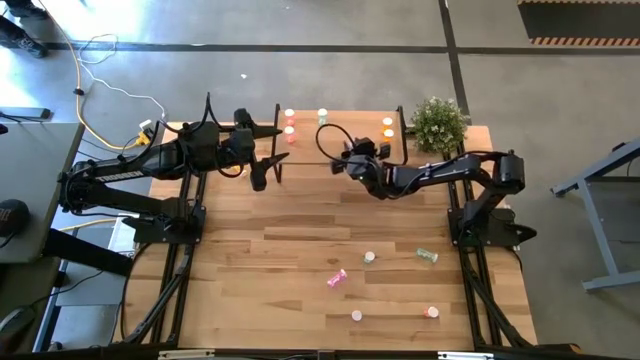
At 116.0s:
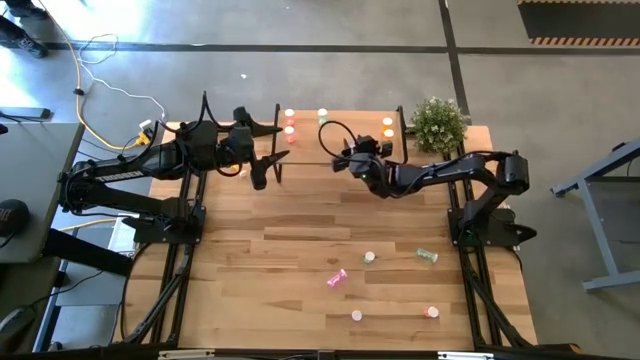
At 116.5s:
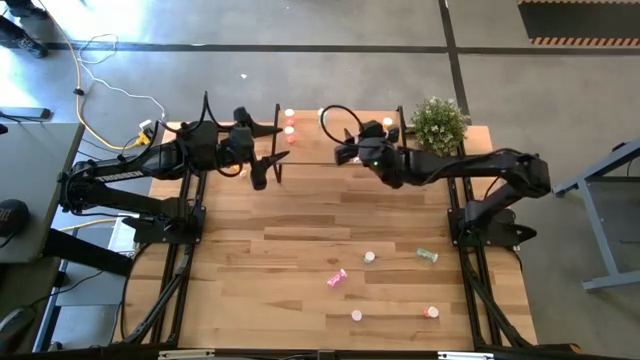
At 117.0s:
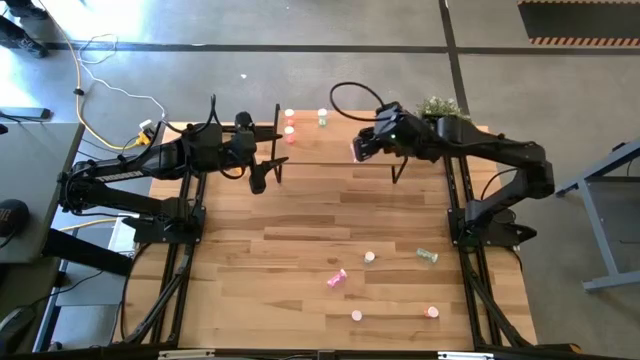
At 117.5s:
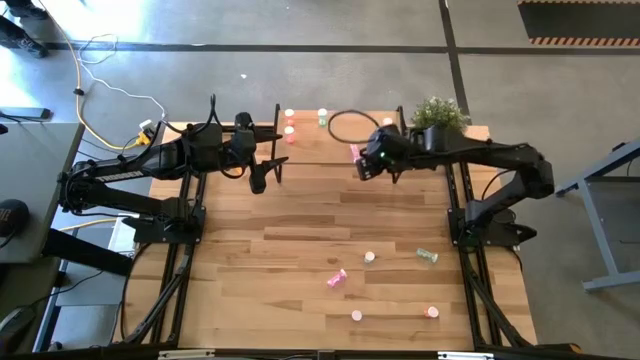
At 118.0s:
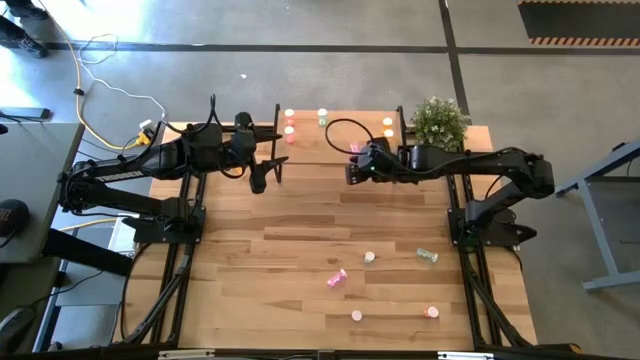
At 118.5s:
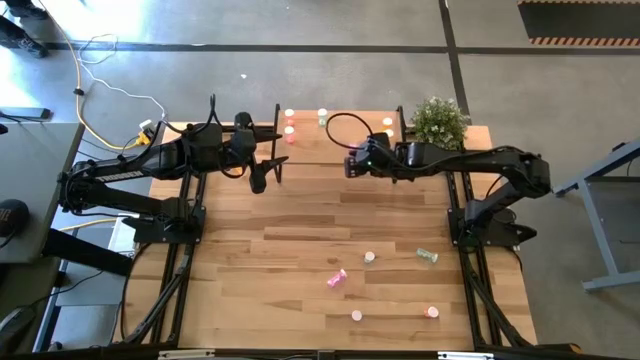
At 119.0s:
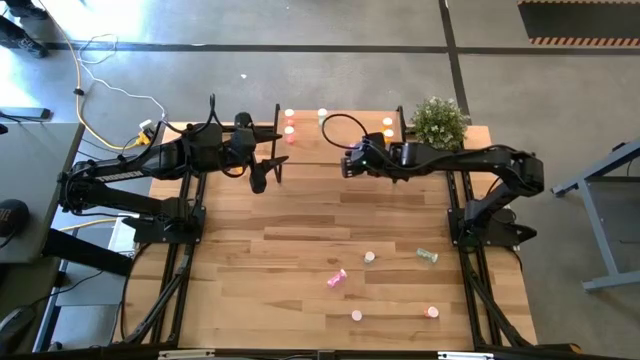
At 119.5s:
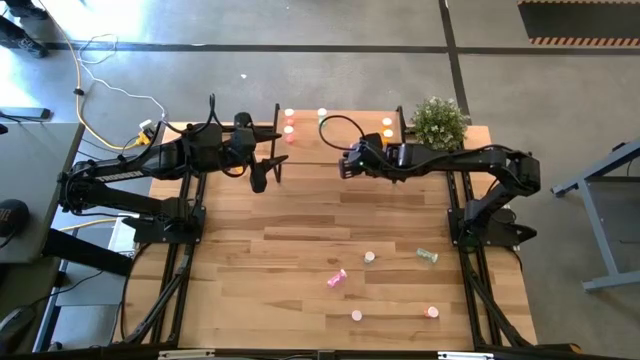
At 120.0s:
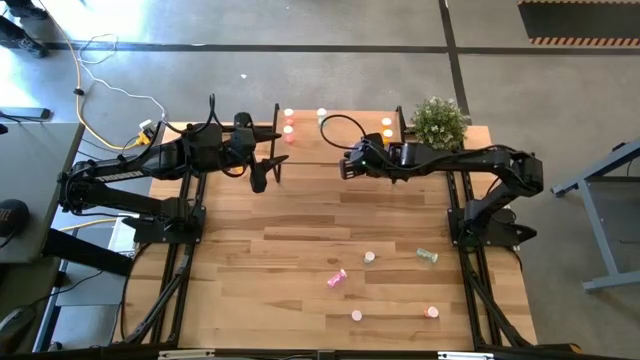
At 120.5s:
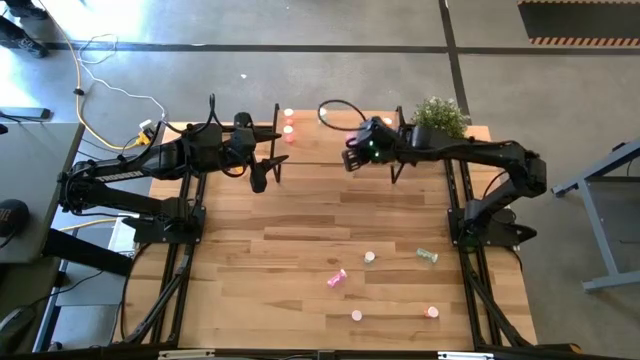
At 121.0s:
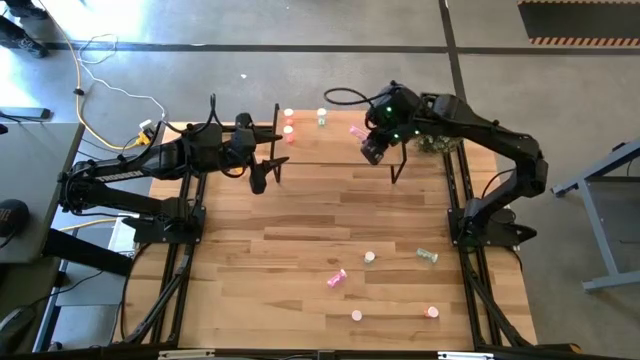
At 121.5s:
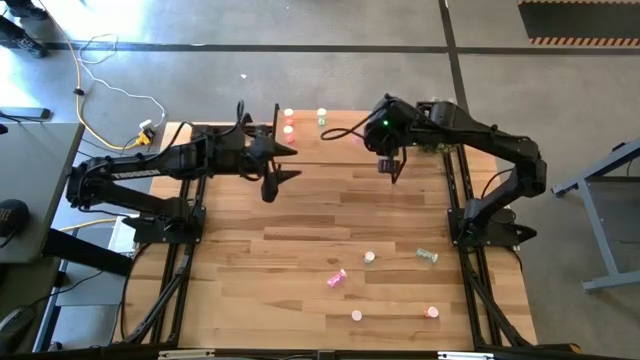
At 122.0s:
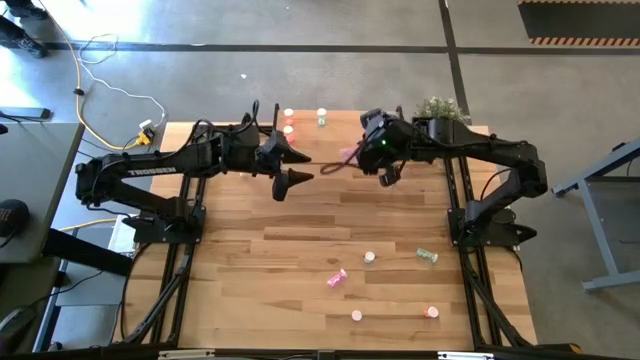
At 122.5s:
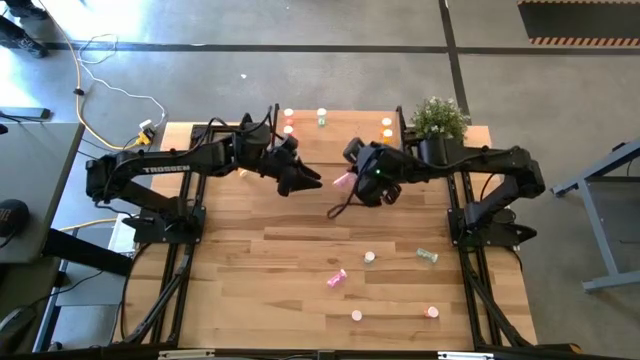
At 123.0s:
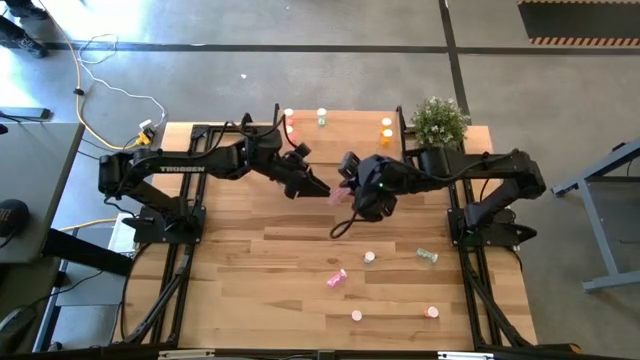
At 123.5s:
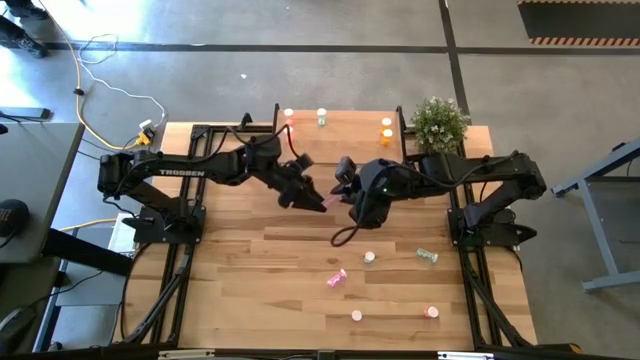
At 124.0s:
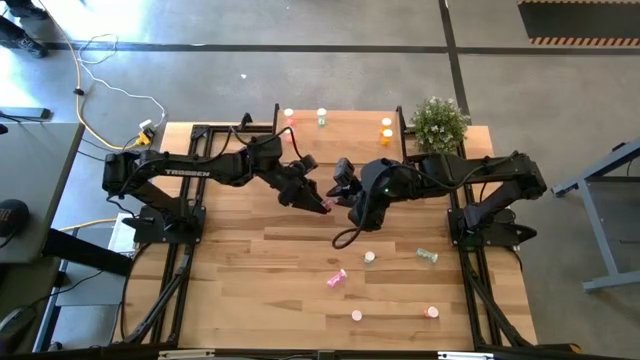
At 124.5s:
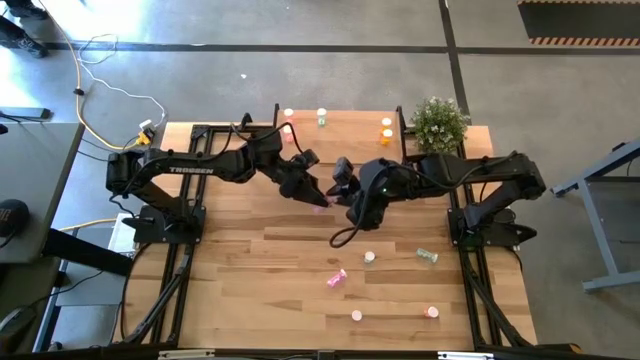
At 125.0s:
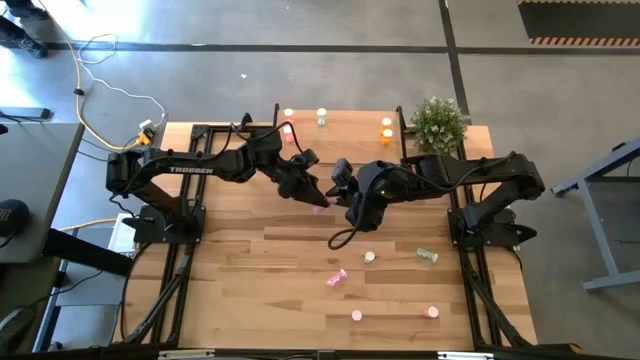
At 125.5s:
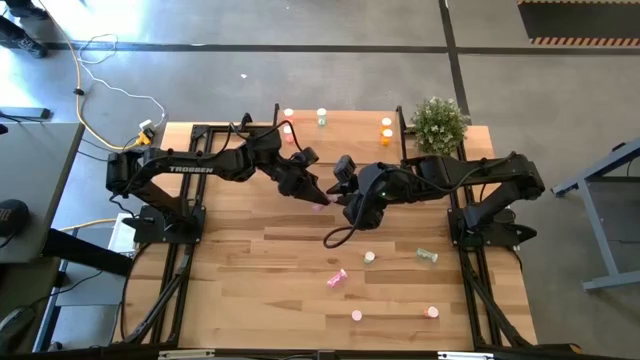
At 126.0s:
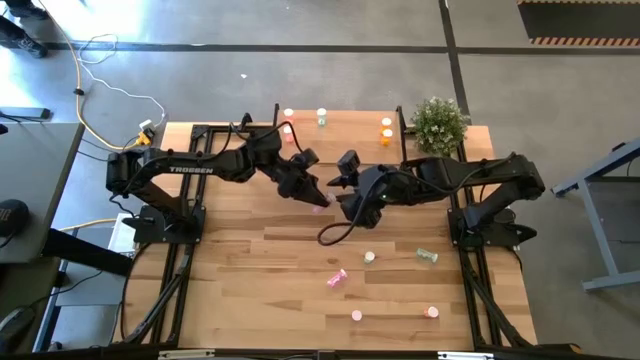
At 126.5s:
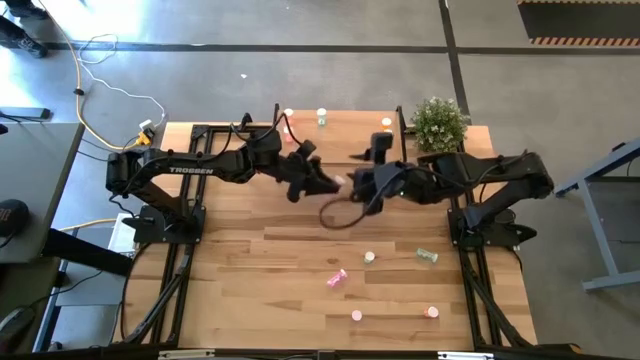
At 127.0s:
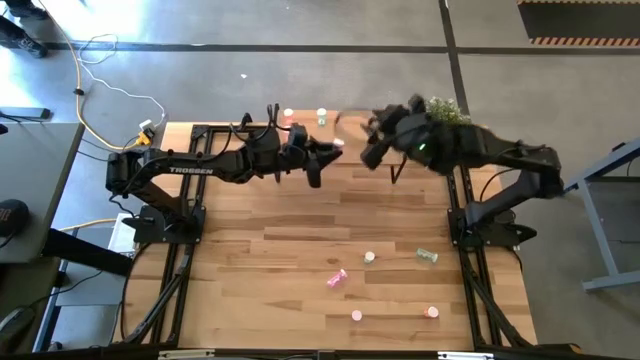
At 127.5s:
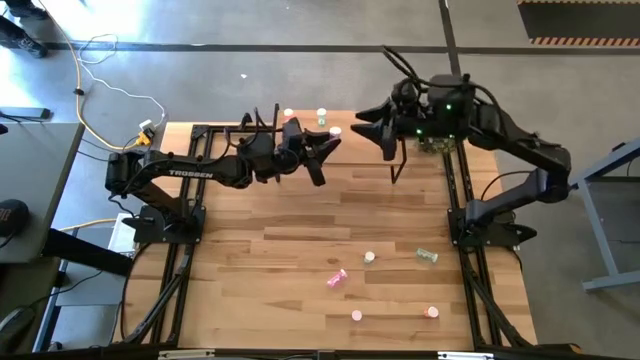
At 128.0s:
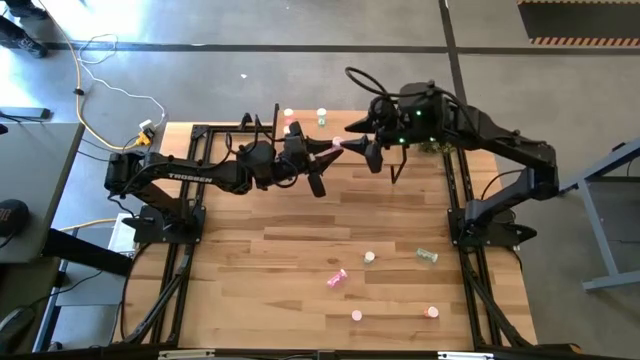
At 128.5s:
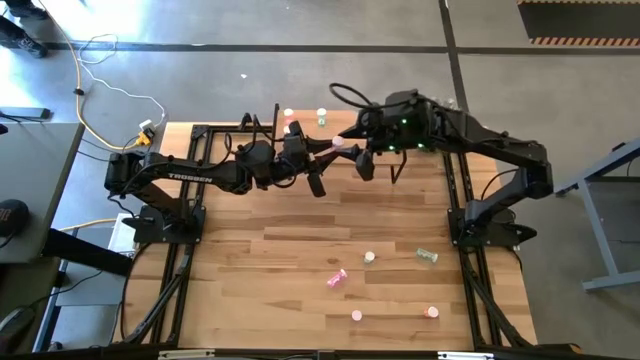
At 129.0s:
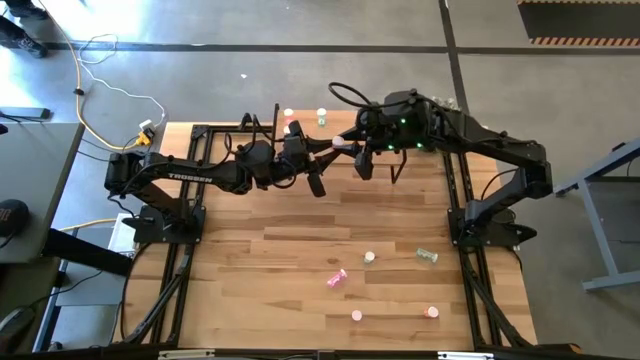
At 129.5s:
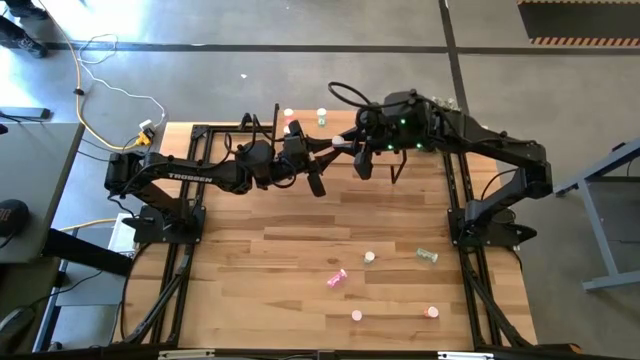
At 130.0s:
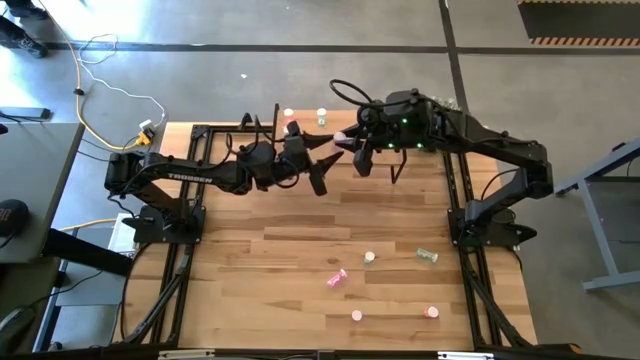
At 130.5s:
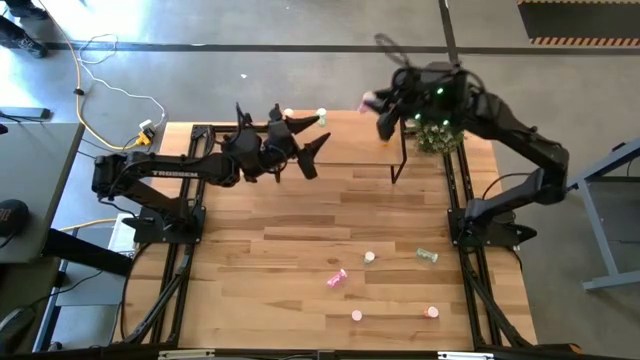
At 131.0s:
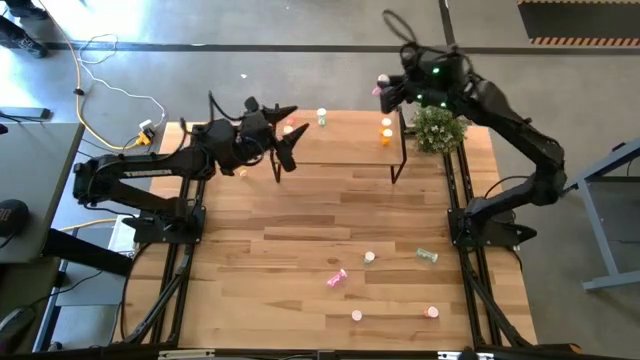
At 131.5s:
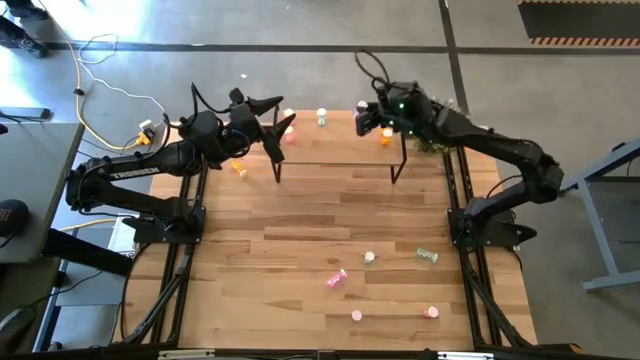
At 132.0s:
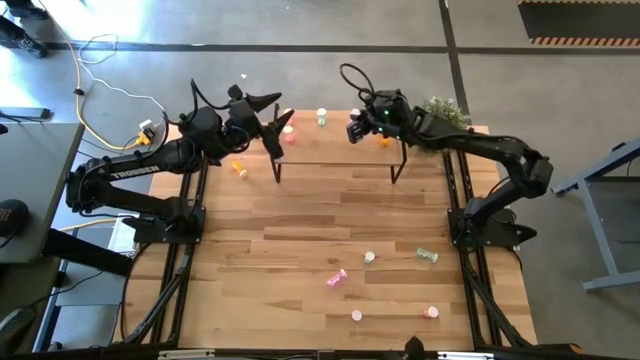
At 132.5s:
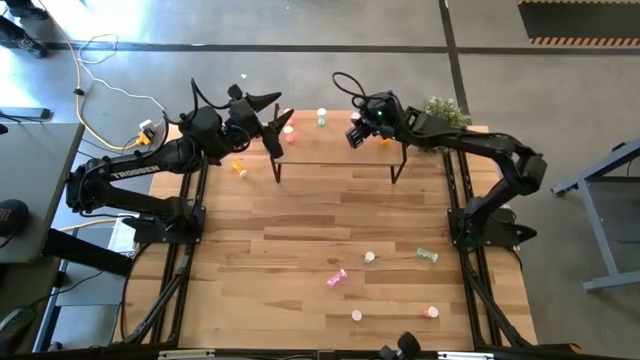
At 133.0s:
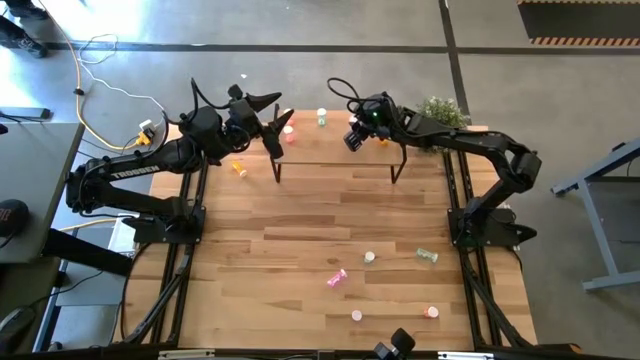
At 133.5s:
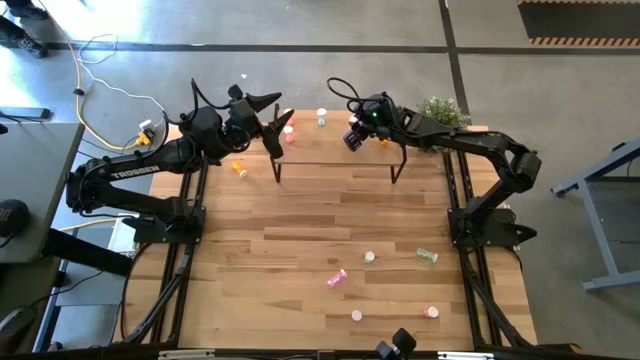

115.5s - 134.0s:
Task: Pick and place medicine bottles onto shelf by color
Put the bottom left purple pill bottle on the shelf

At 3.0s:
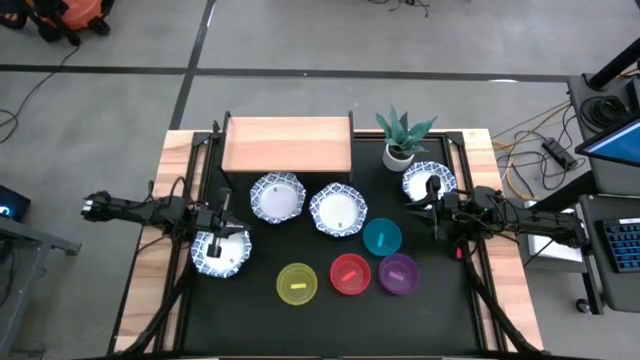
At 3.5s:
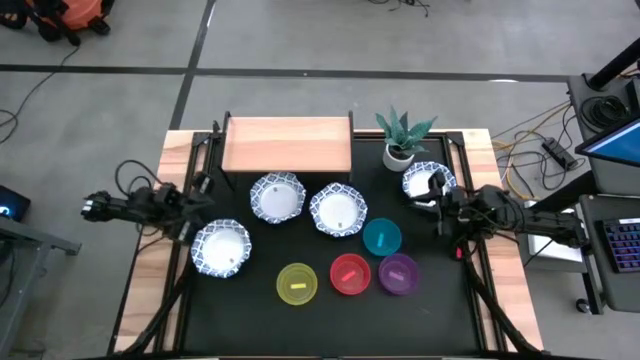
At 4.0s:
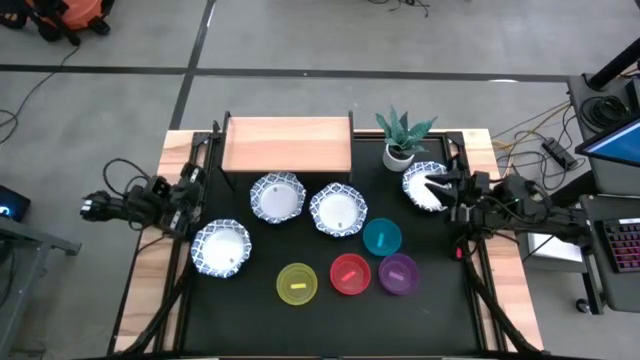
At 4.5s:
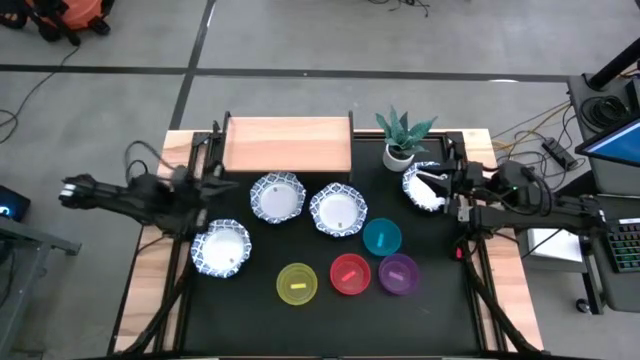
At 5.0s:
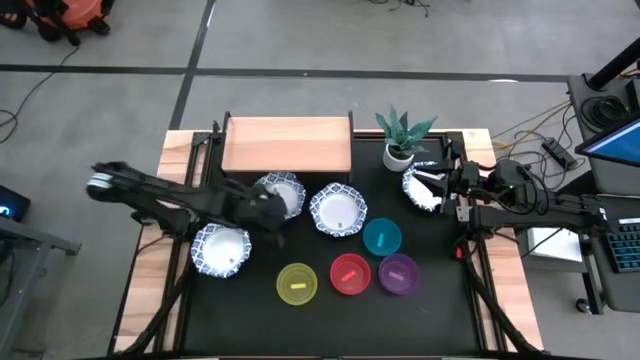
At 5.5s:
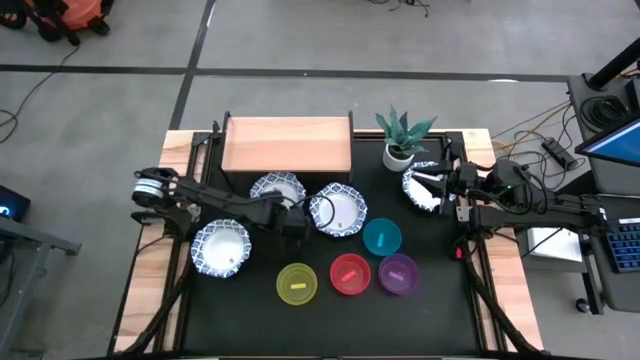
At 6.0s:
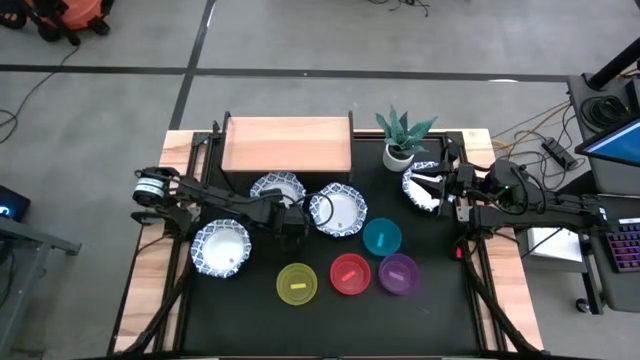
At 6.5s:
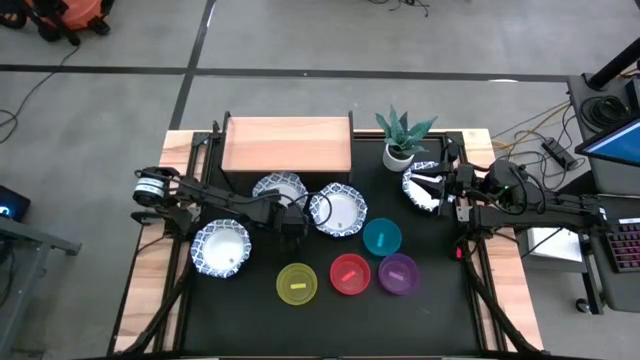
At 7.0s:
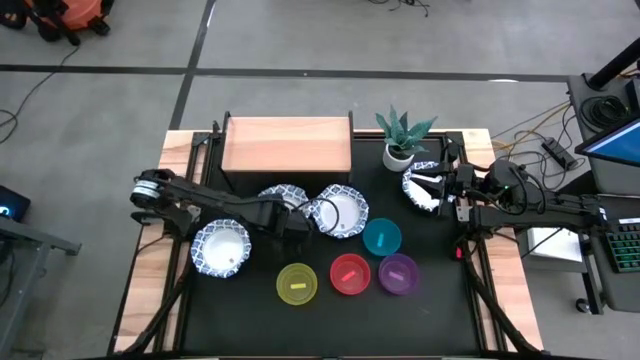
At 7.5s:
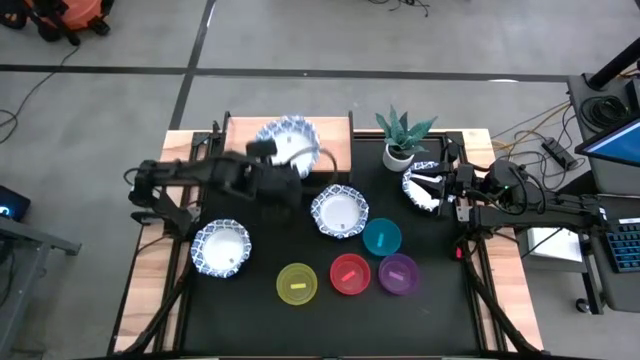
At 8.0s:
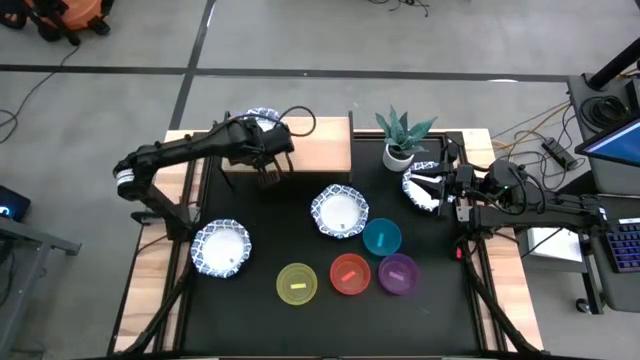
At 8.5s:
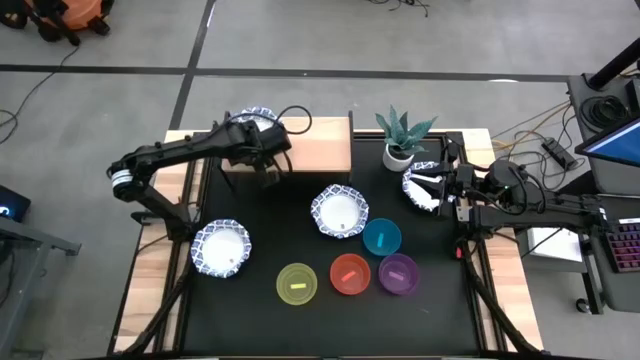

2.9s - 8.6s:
Task: Place and stack bowls onto a shelf
Put the blue patterned bowl on the shelf
